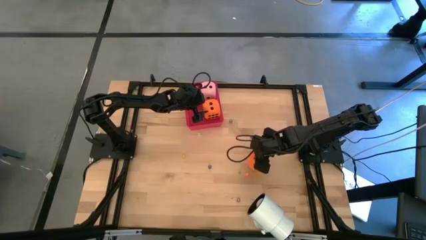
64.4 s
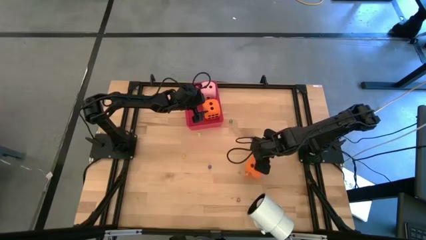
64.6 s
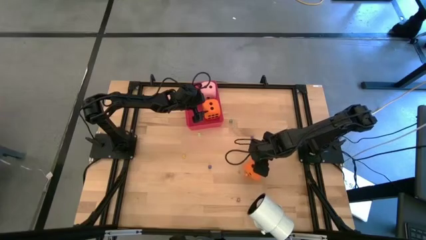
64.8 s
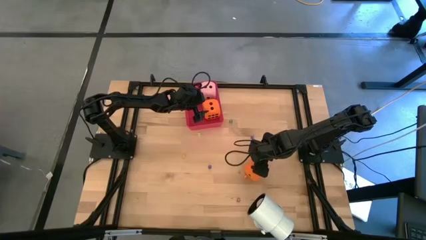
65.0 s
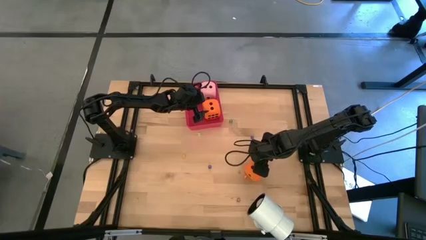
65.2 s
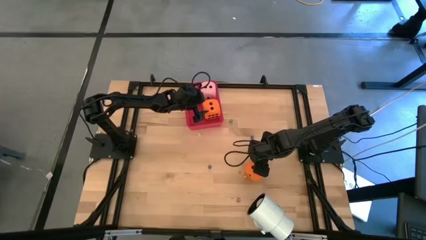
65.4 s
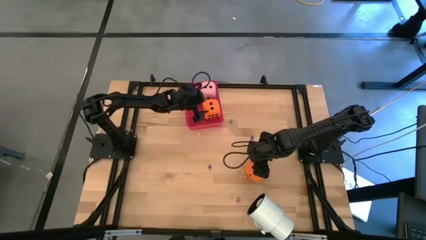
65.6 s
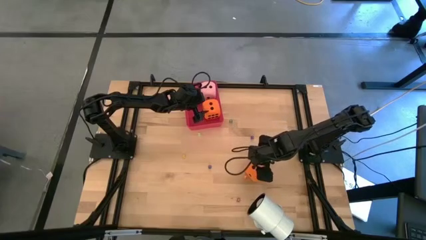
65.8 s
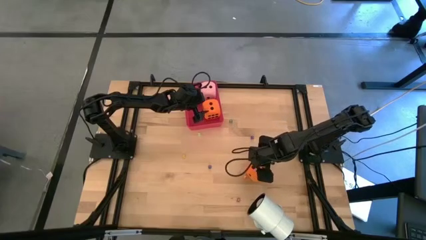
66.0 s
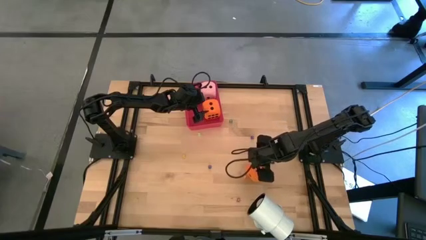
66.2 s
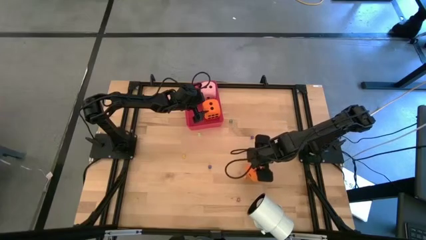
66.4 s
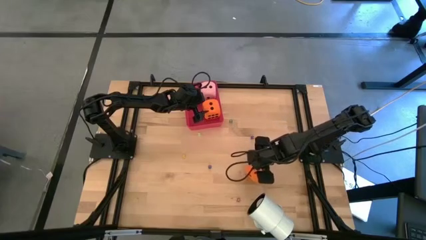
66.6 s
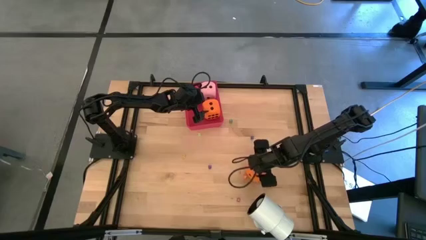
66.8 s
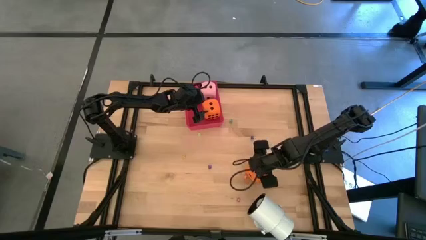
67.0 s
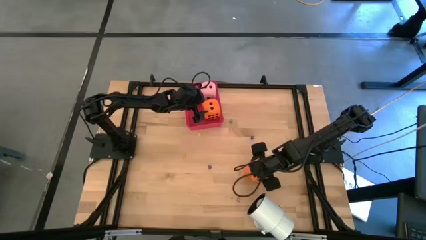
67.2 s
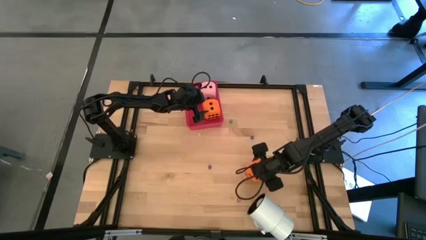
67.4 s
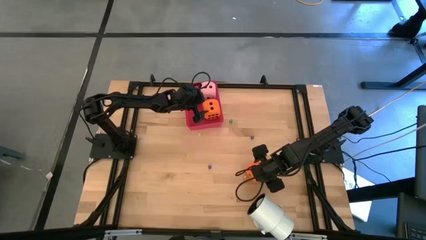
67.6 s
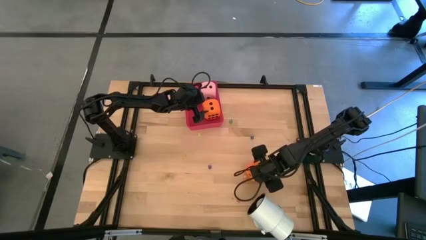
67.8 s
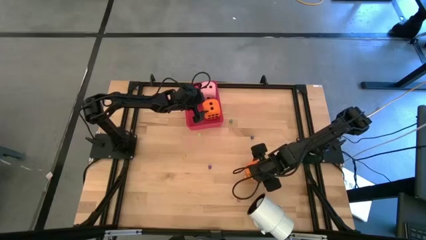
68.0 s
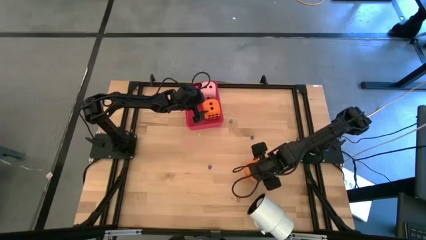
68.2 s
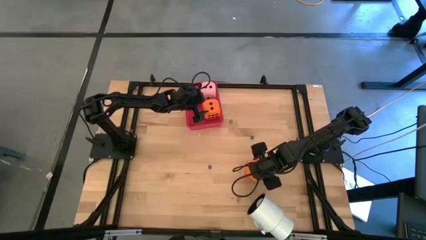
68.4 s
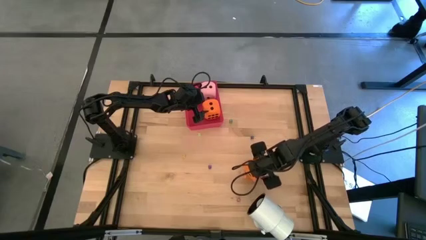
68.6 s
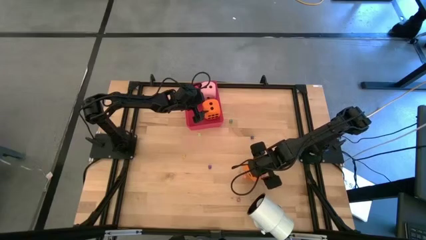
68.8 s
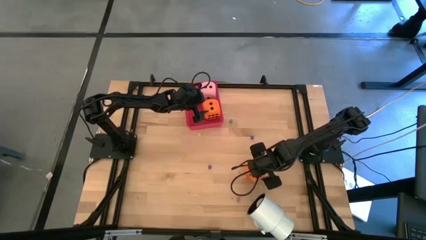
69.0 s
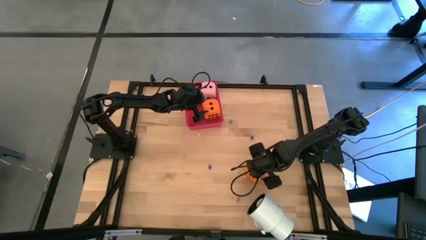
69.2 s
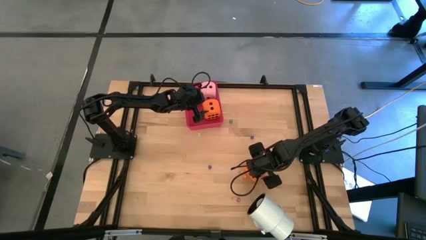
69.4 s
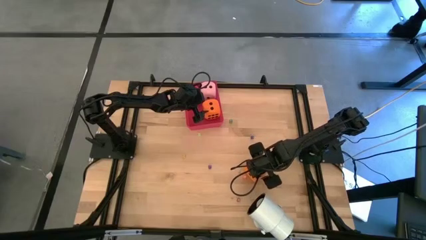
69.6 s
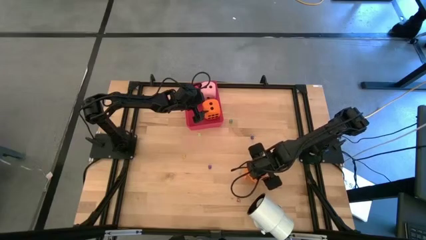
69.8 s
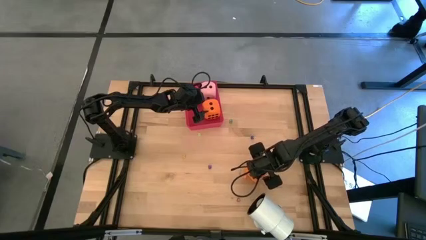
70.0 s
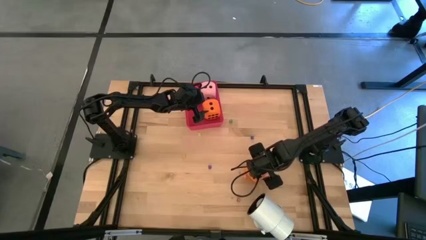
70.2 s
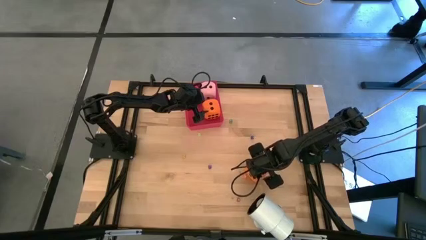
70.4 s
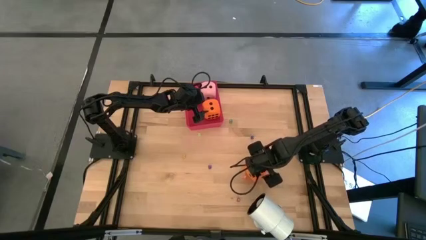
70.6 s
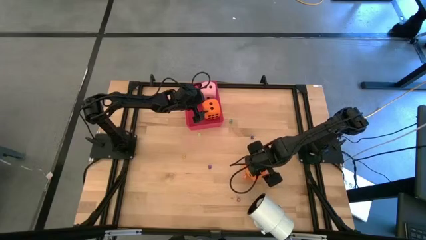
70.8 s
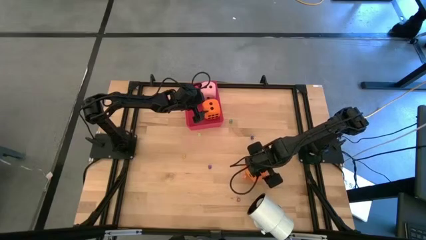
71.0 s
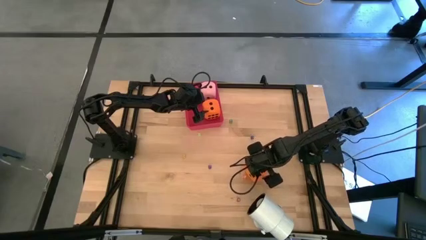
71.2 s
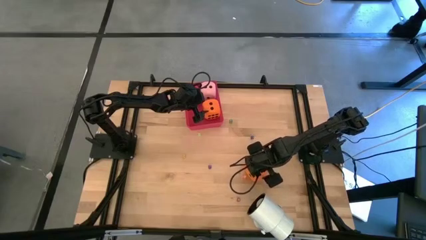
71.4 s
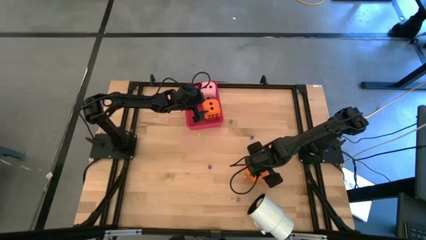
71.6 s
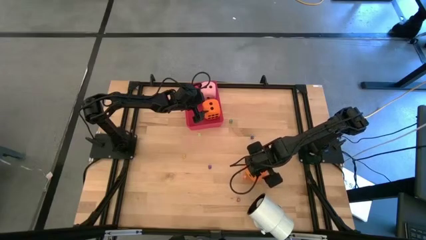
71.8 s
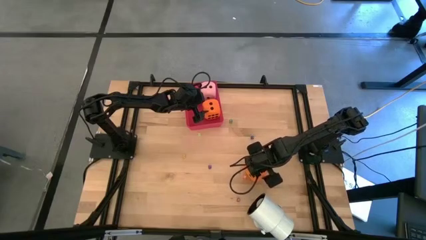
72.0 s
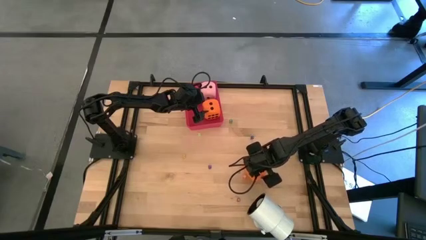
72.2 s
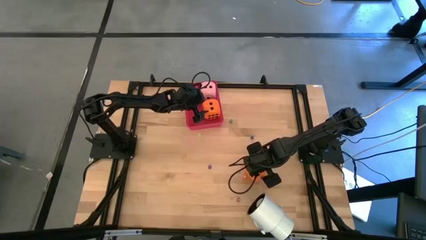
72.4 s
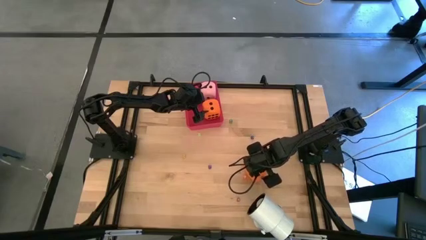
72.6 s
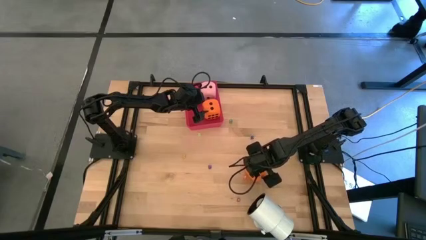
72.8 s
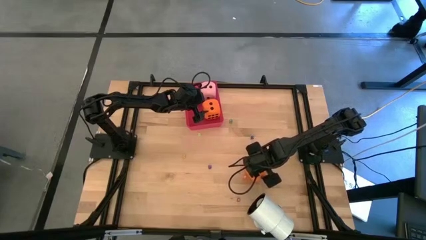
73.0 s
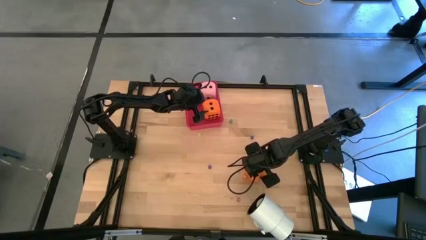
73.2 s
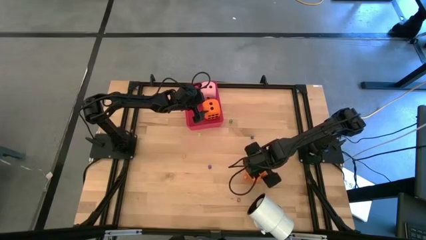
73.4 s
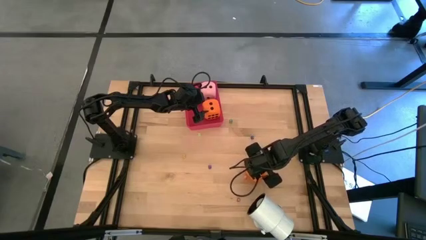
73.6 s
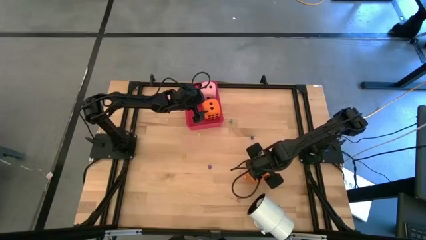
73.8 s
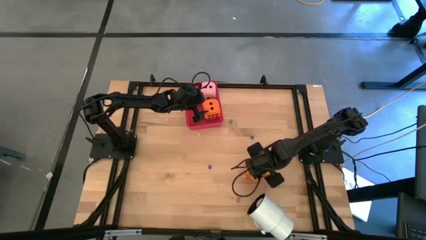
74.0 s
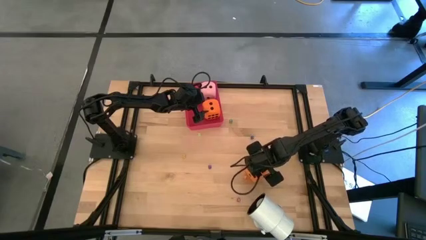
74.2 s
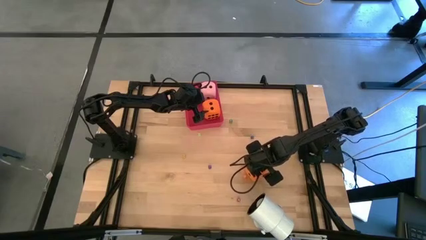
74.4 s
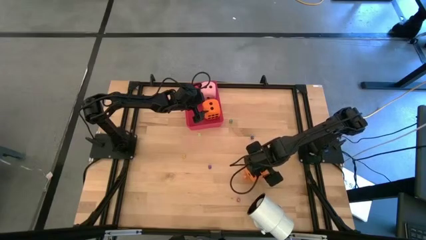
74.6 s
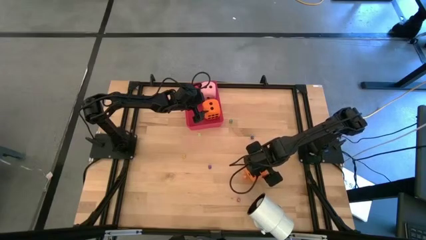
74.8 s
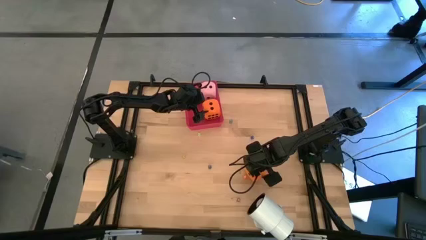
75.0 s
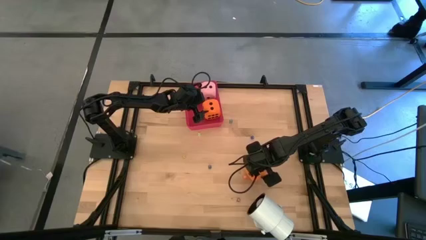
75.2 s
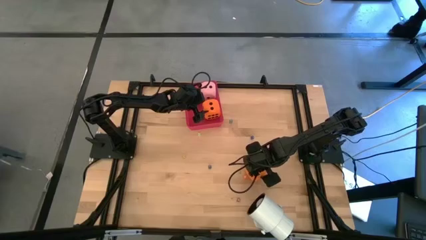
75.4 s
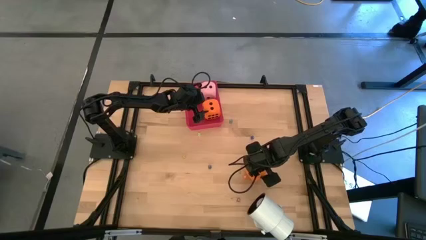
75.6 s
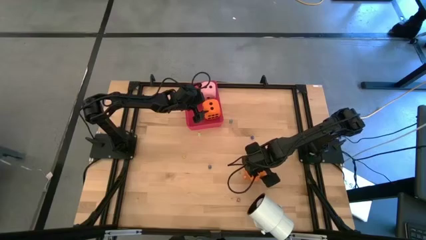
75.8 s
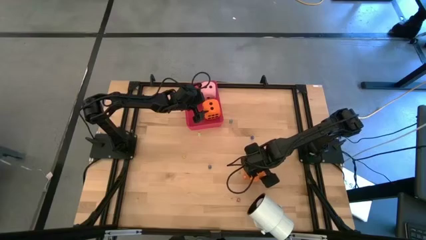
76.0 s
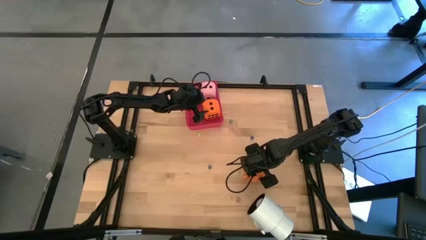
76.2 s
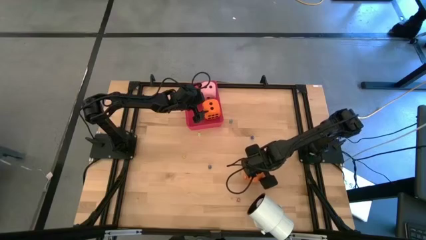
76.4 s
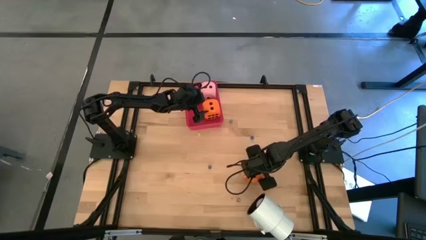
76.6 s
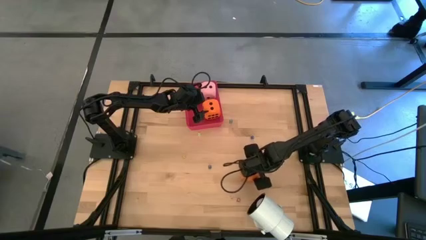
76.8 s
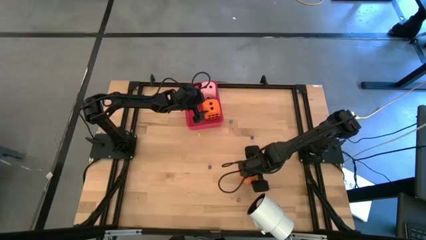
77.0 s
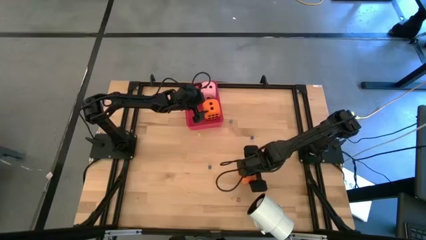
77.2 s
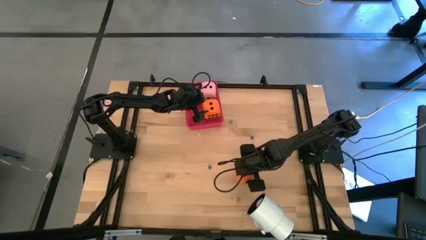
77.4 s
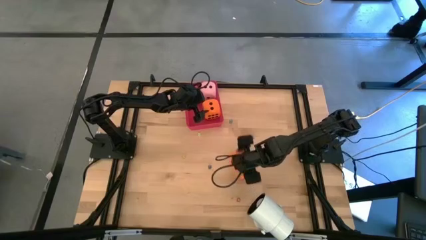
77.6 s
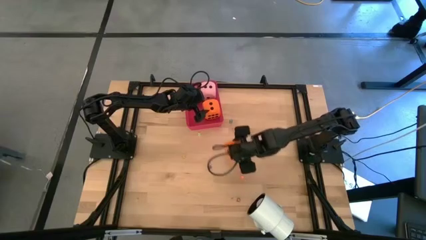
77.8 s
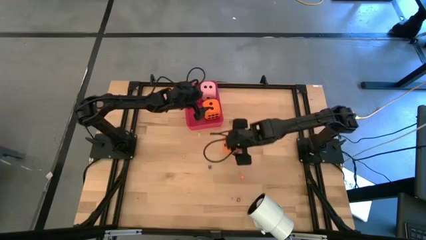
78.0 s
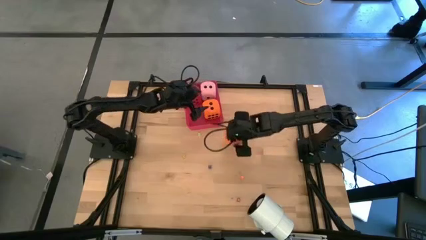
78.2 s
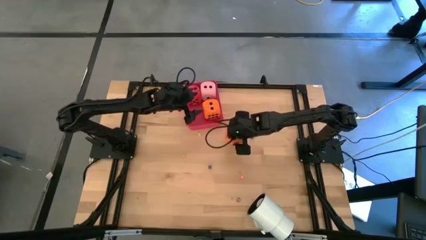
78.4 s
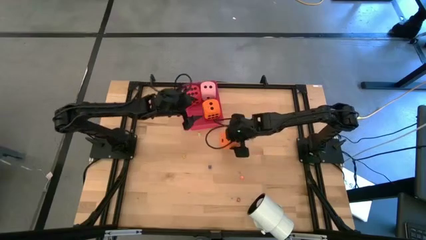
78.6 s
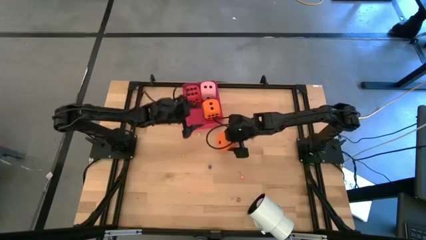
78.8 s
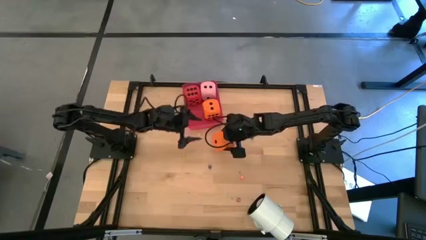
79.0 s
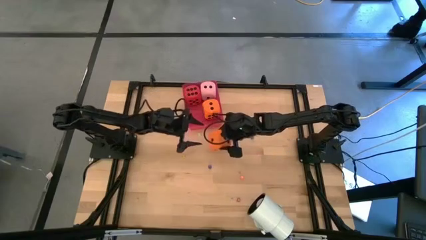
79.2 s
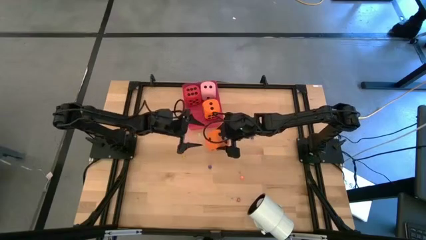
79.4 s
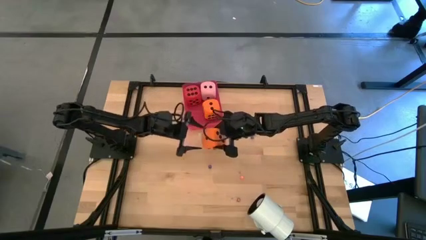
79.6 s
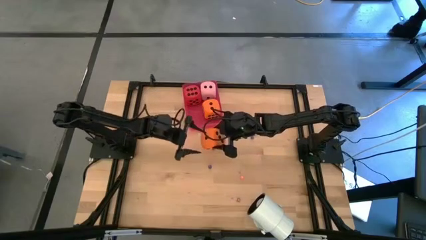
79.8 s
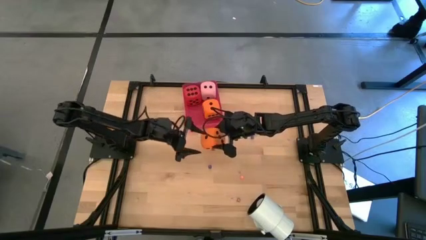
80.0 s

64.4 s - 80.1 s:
Task: Pick & Place Dice
Put the big orange dice into the red bin
